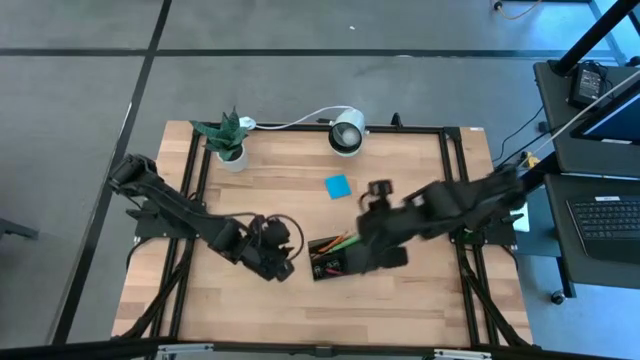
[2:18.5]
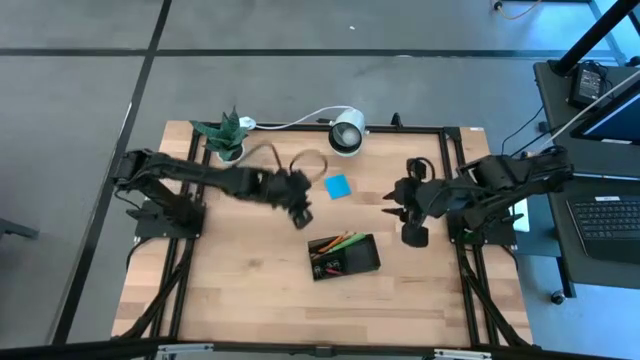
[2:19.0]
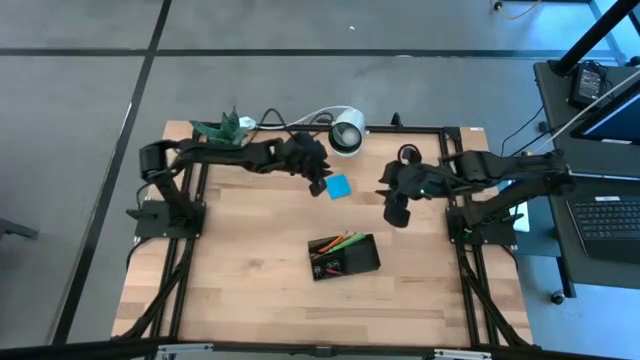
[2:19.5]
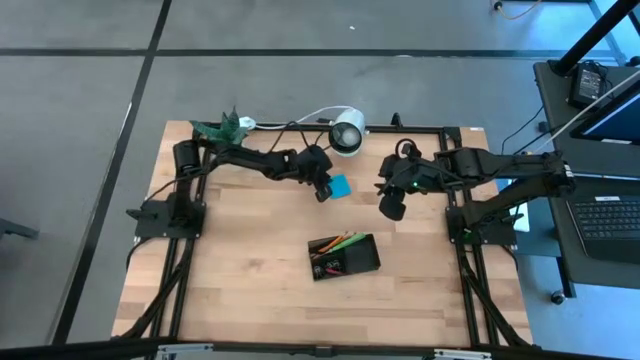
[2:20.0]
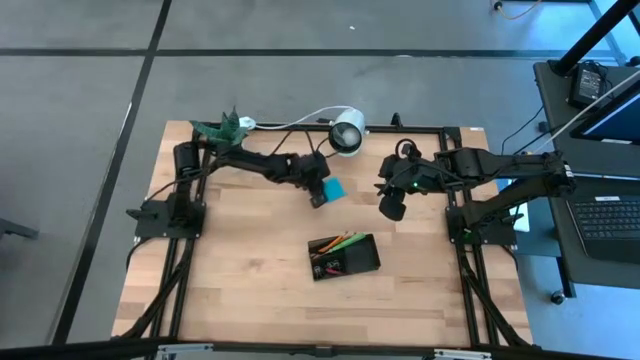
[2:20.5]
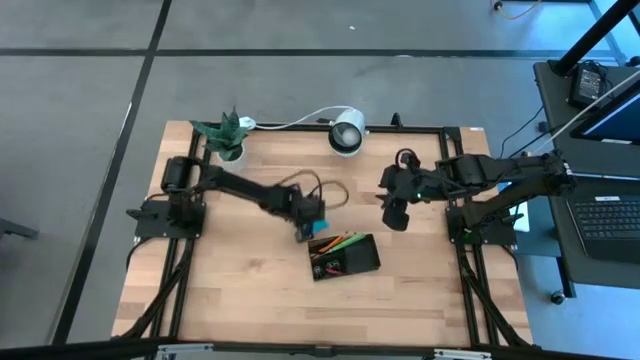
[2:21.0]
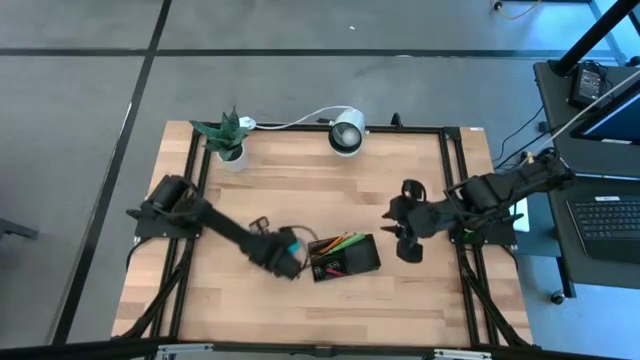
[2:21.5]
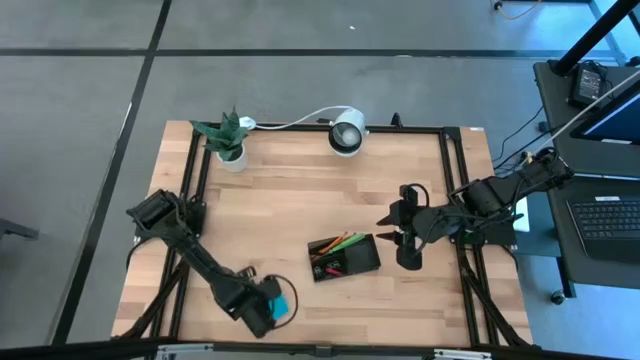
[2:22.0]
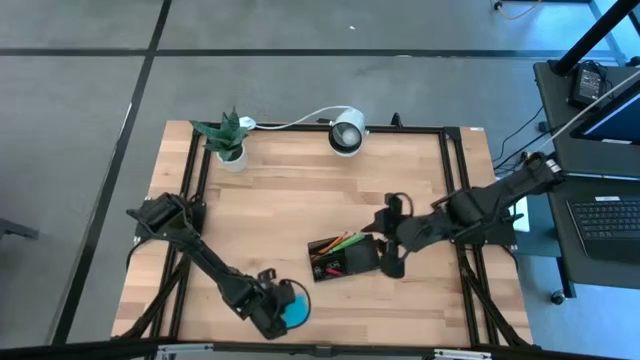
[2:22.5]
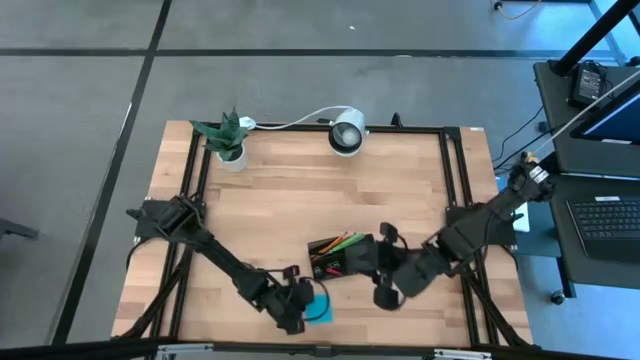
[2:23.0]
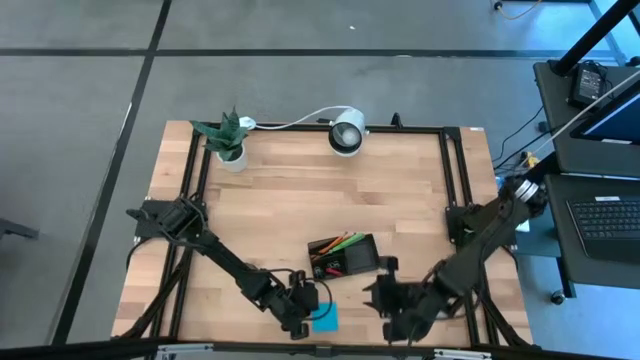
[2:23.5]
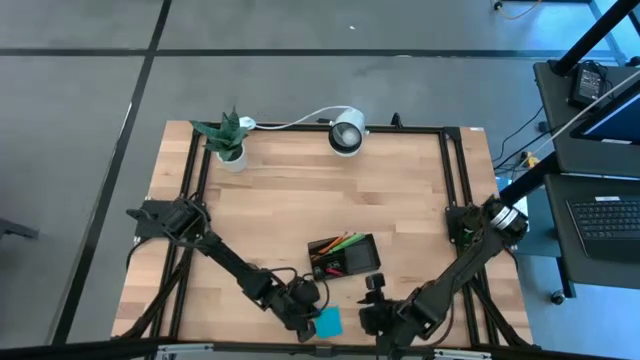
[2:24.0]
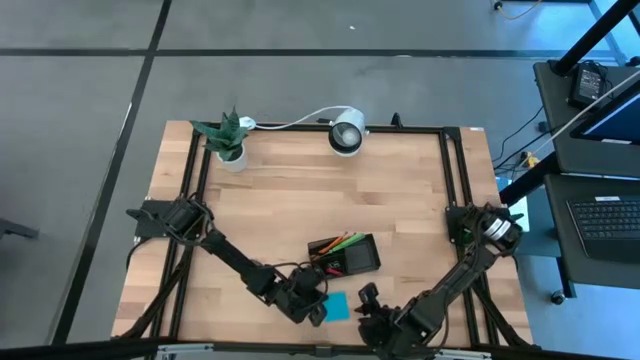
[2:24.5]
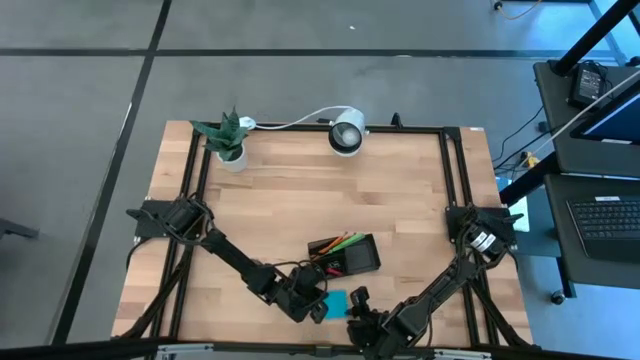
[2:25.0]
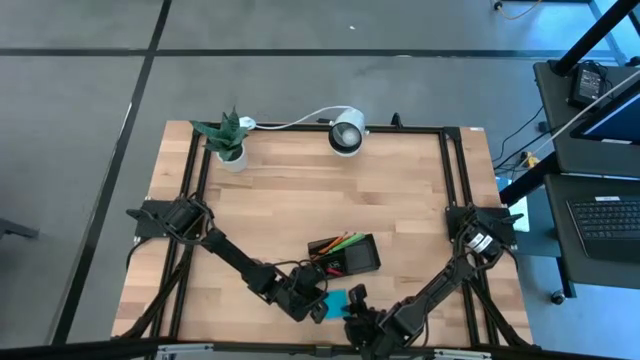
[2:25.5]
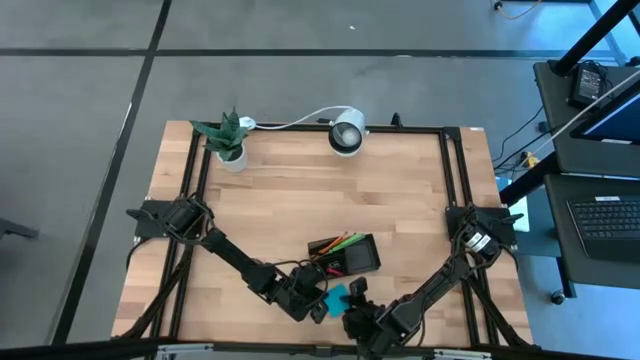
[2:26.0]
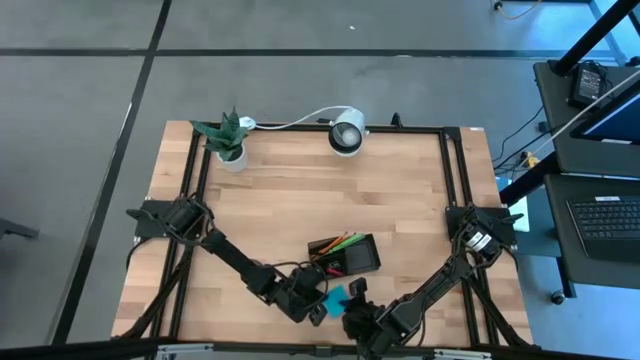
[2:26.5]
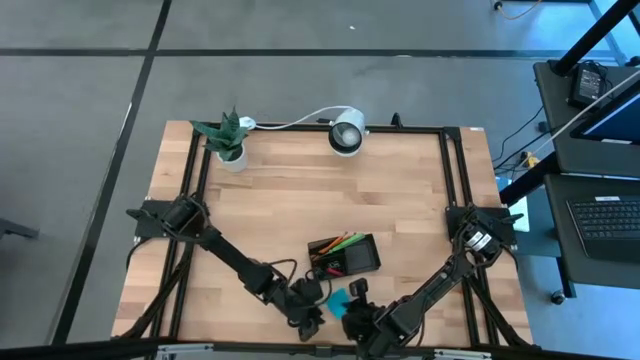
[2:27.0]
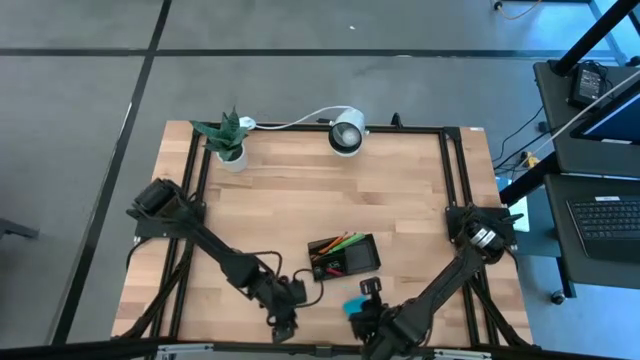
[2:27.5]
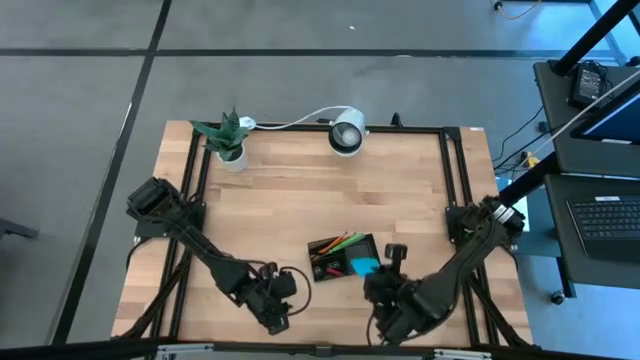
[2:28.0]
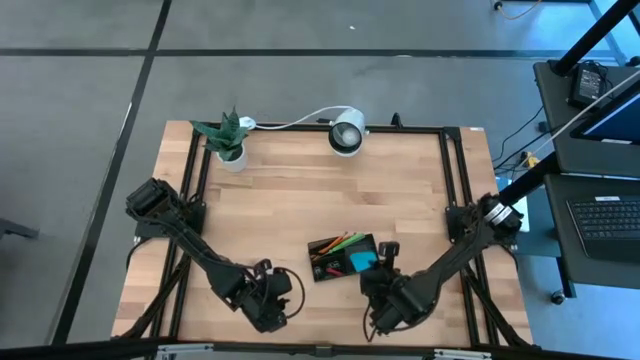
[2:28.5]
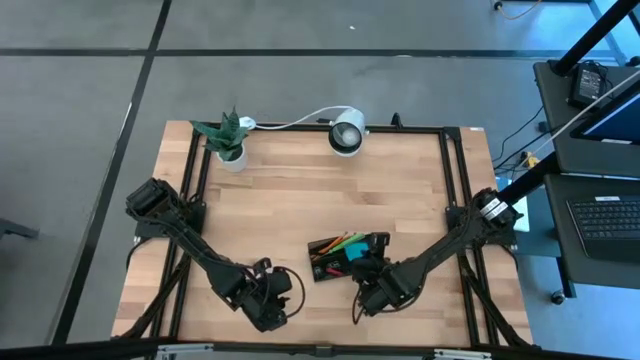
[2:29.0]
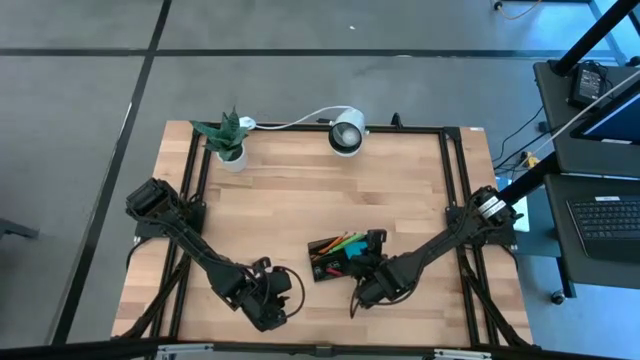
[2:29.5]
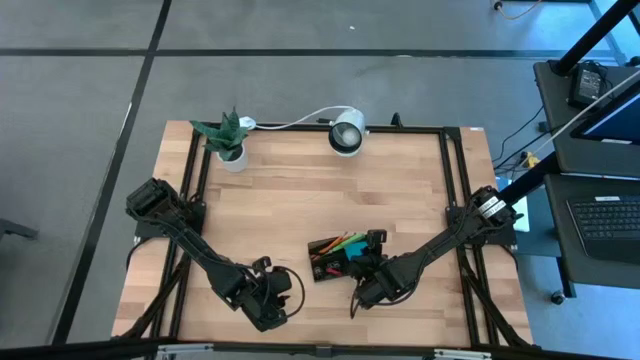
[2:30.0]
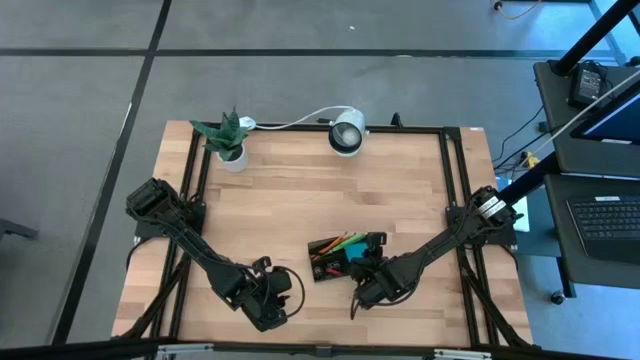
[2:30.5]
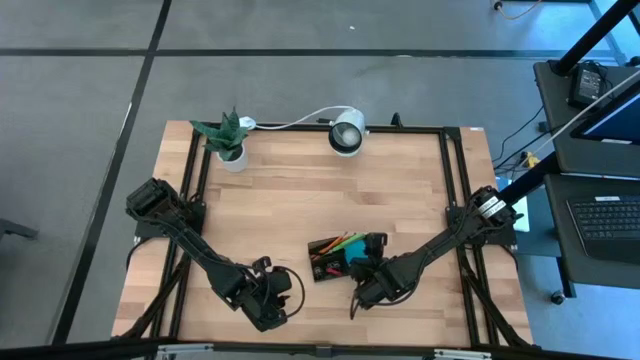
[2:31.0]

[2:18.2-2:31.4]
Task: Pick and place office supplies into organizer
Put the sticky notes into the desk organizer

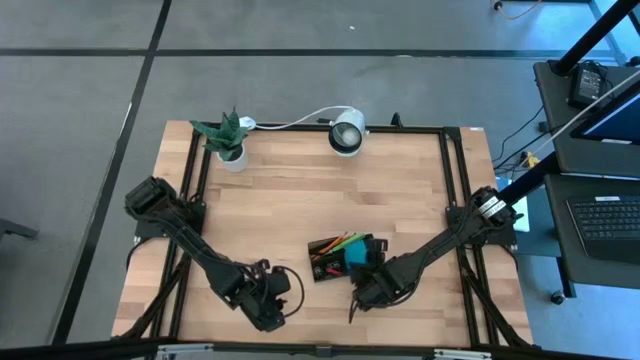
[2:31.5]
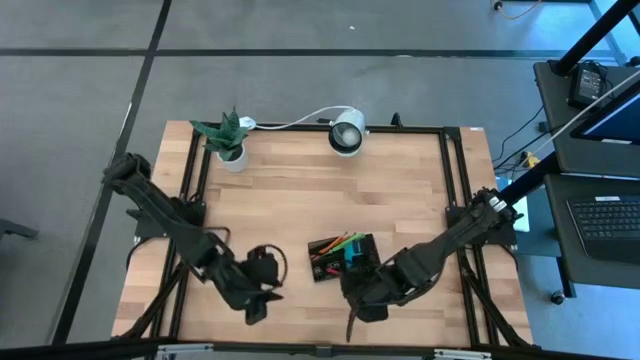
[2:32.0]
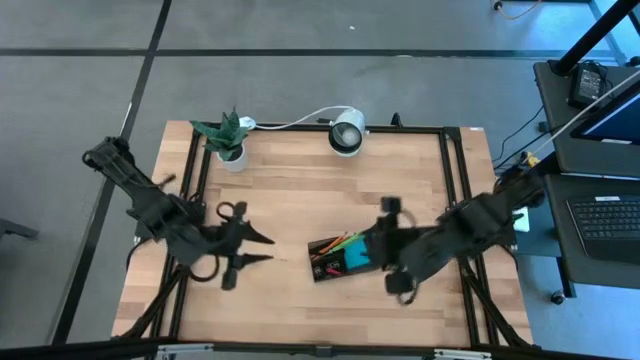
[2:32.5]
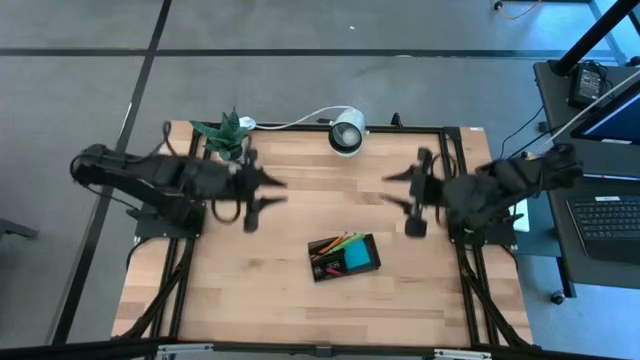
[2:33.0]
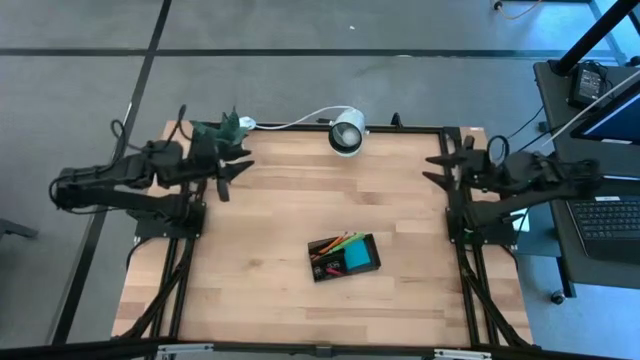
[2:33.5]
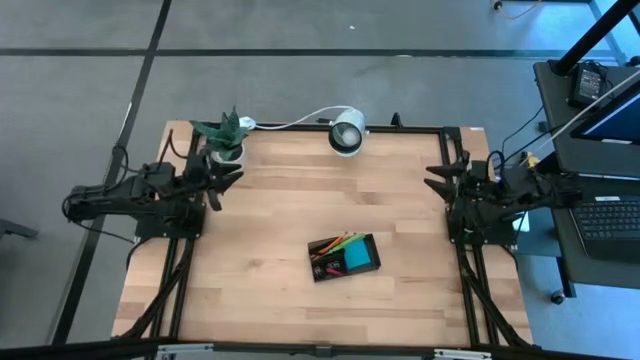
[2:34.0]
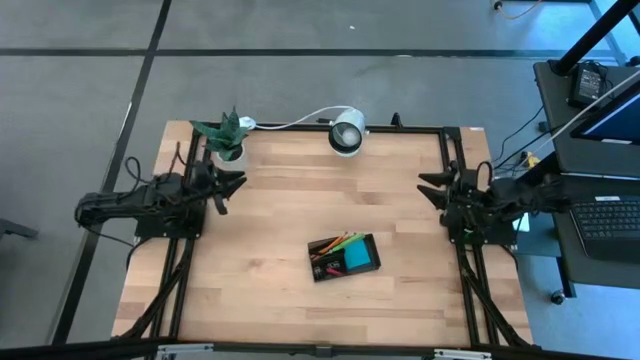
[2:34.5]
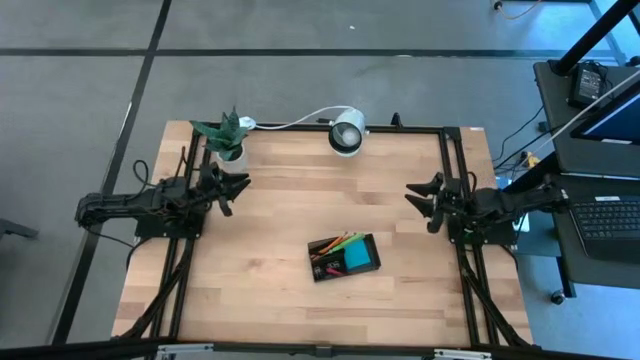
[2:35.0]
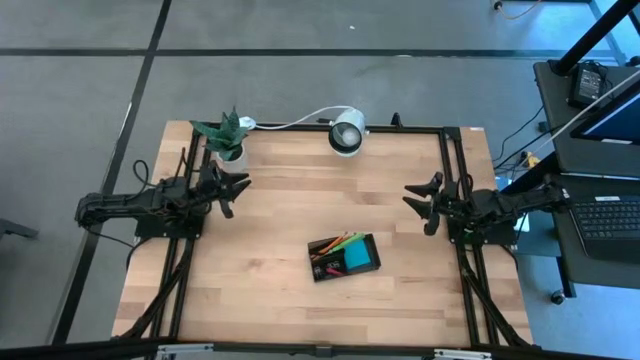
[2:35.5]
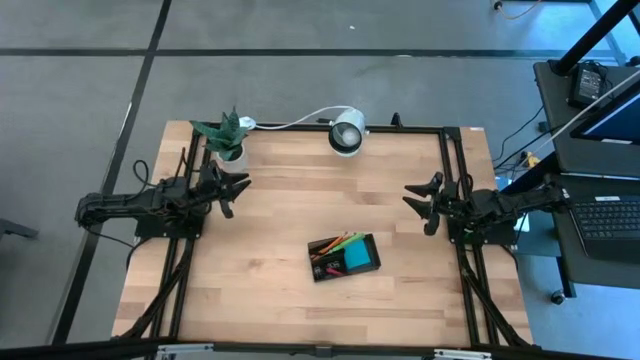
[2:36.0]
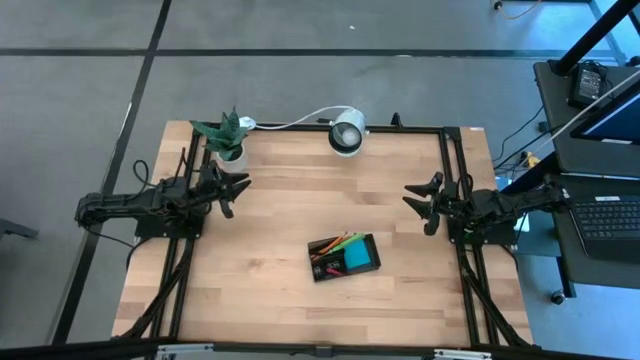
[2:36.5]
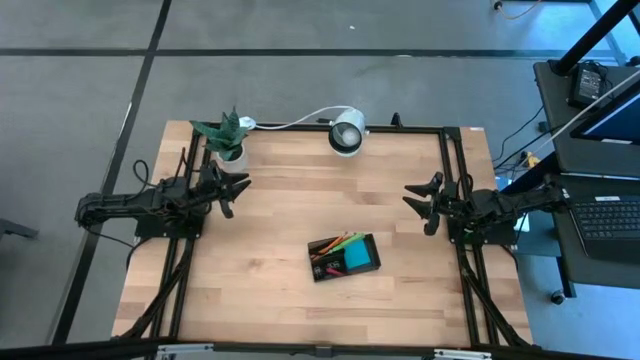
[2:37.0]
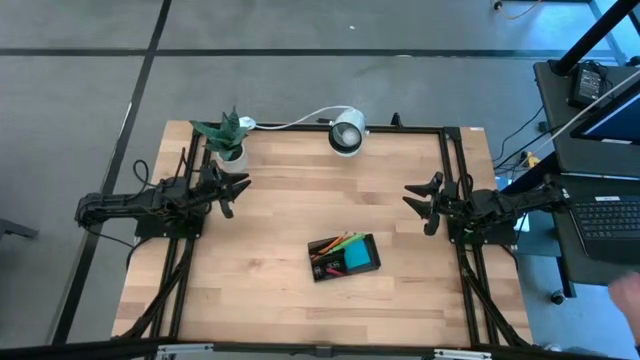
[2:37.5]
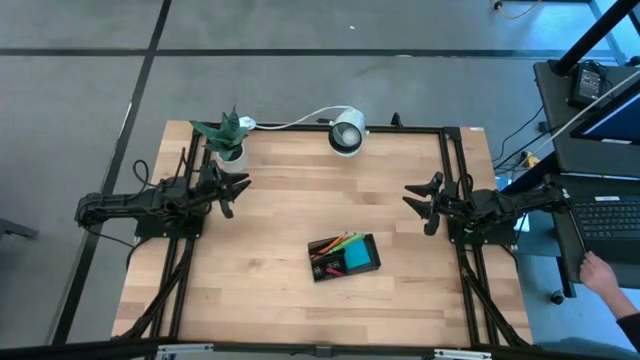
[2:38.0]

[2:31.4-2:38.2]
Return to Home Position

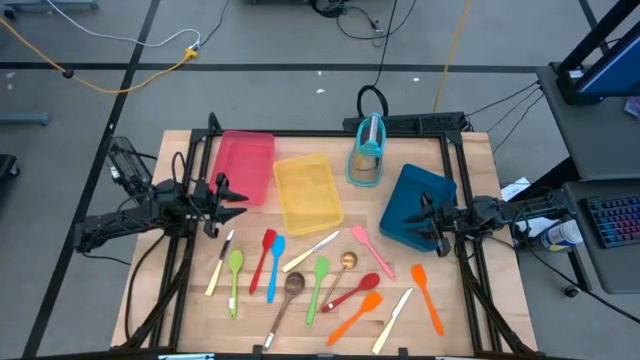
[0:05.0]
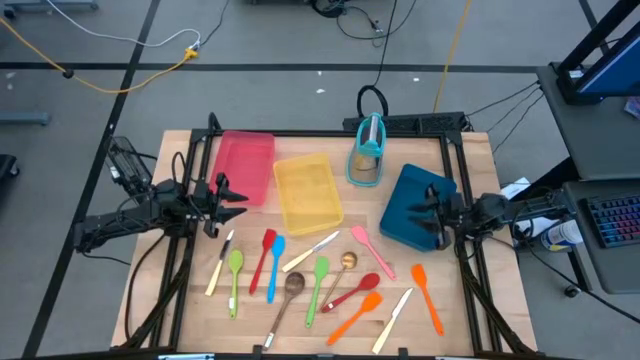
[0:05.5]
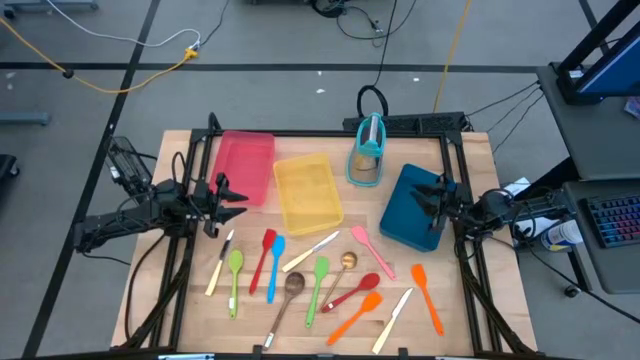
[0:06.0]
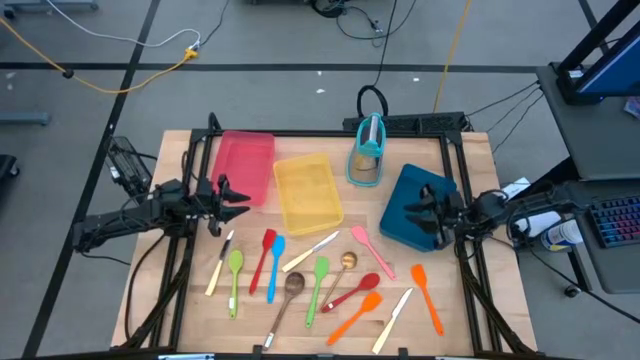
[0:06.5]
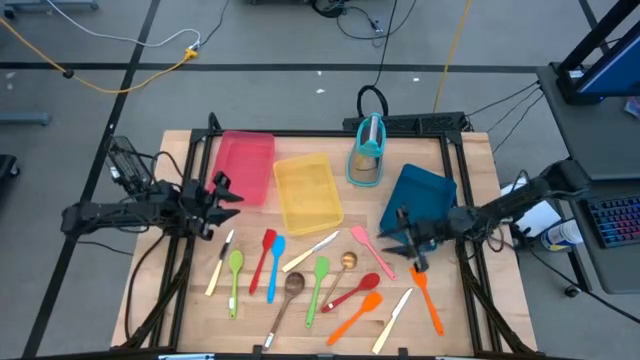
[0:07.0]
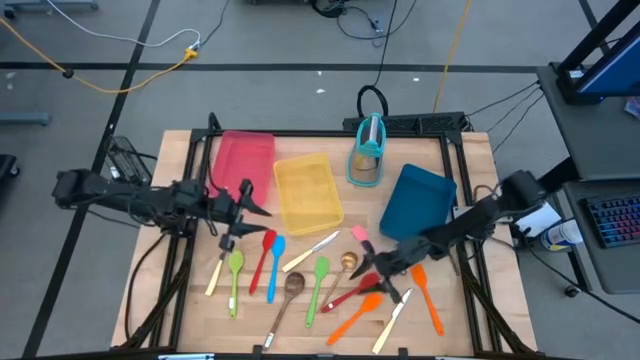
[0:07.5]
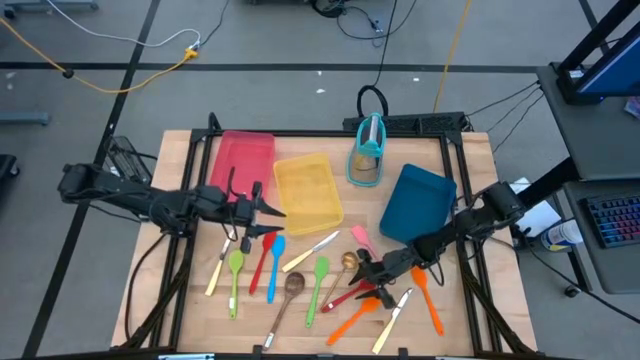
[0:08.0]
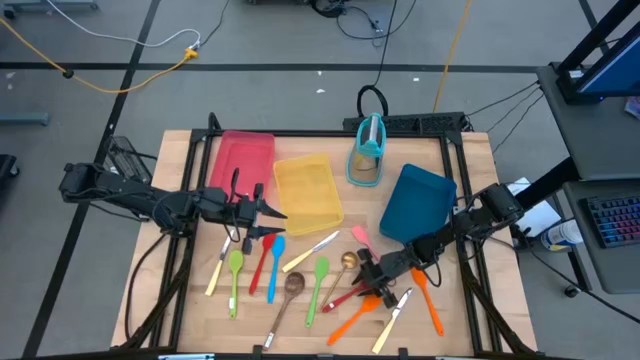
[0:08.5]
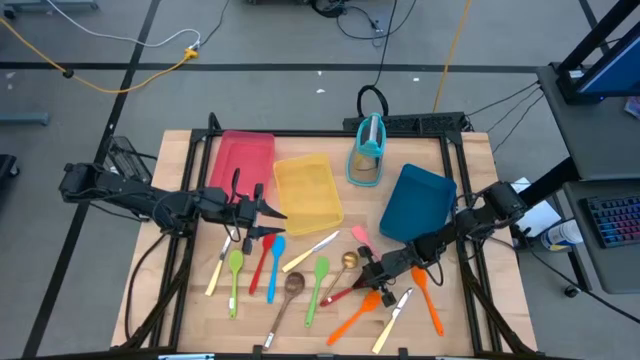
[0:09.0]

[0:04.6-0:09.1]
Task: Pick & Place Kitchen Items
Put the red serving spoon into the blue bin
